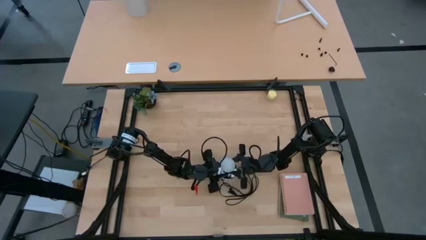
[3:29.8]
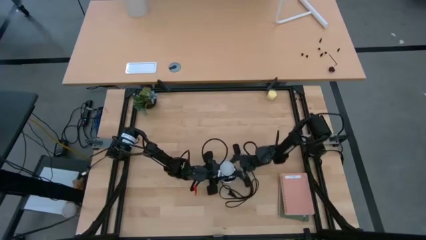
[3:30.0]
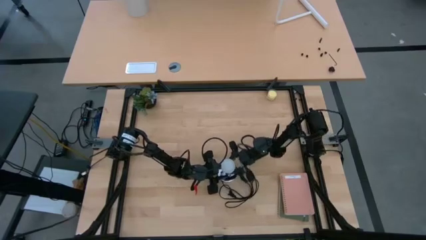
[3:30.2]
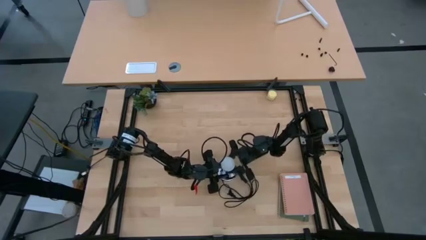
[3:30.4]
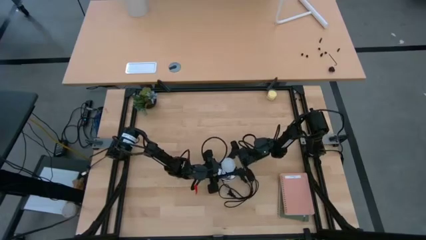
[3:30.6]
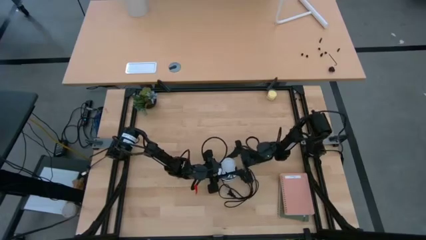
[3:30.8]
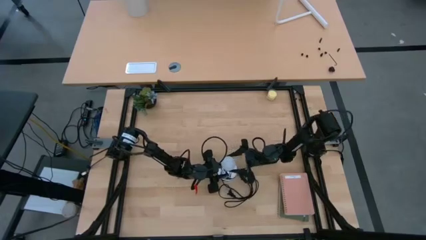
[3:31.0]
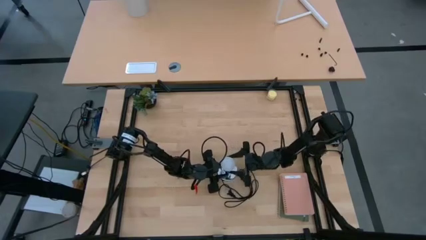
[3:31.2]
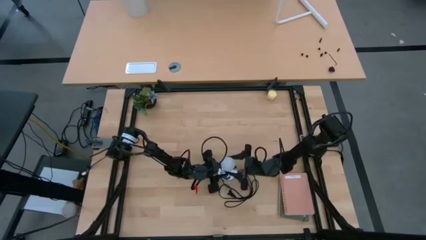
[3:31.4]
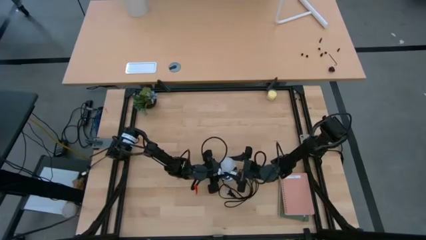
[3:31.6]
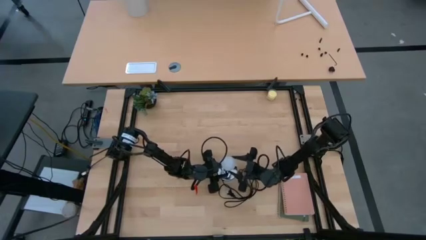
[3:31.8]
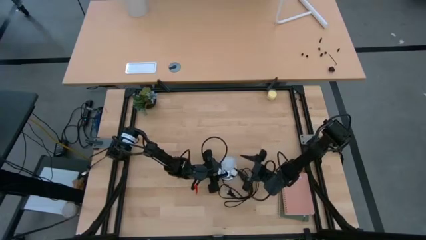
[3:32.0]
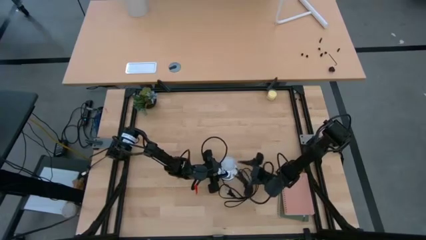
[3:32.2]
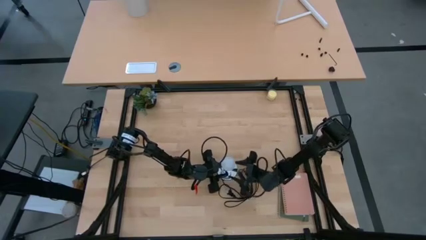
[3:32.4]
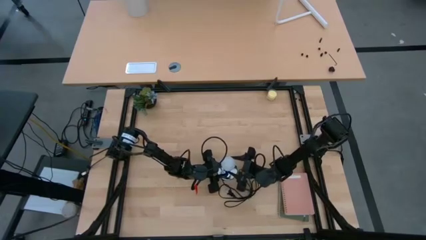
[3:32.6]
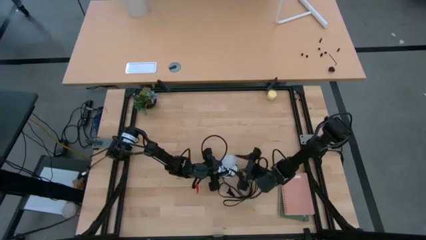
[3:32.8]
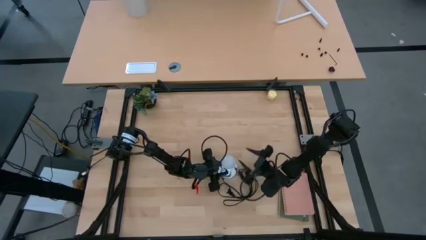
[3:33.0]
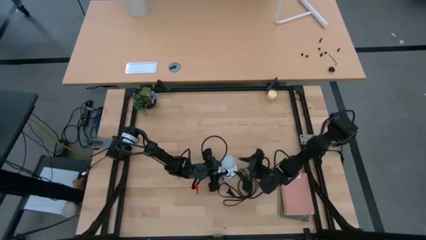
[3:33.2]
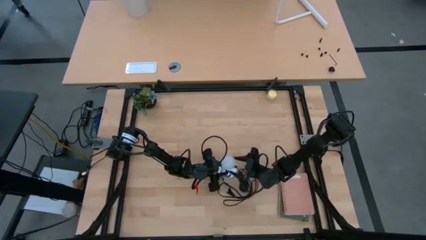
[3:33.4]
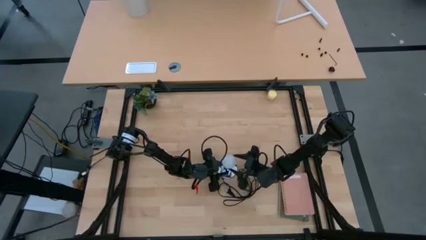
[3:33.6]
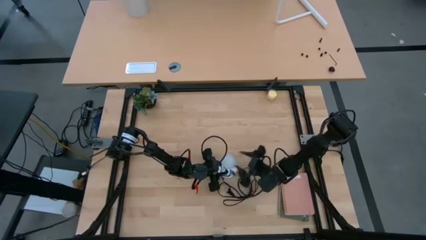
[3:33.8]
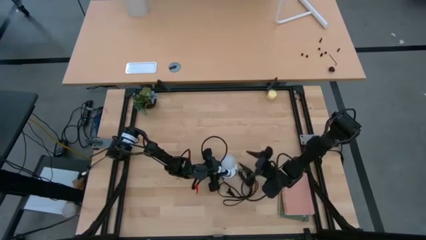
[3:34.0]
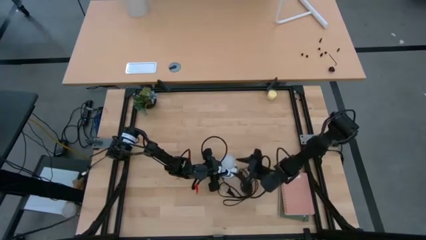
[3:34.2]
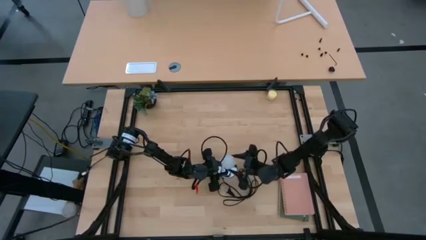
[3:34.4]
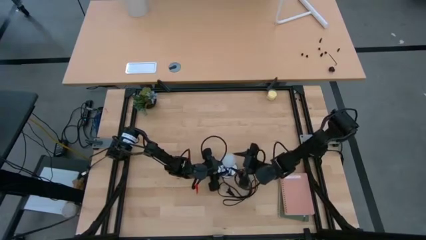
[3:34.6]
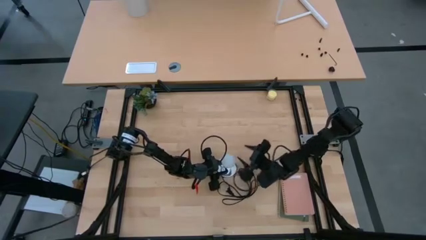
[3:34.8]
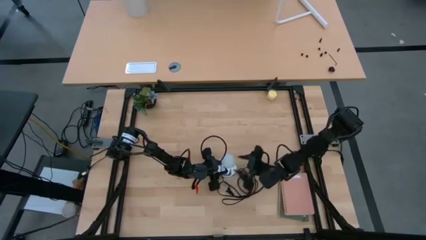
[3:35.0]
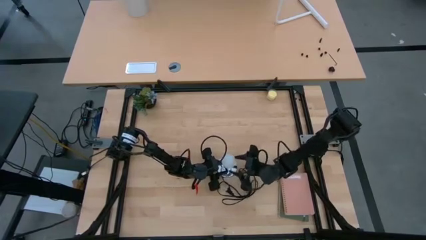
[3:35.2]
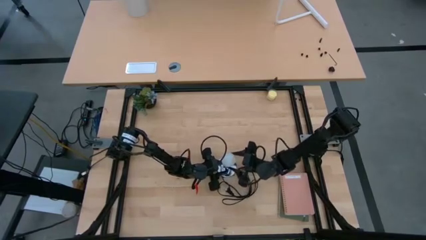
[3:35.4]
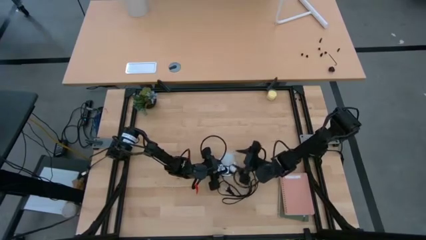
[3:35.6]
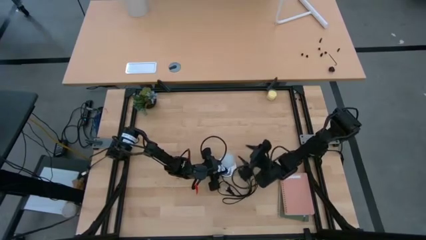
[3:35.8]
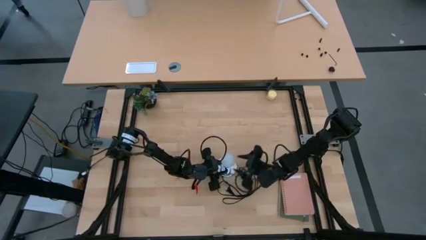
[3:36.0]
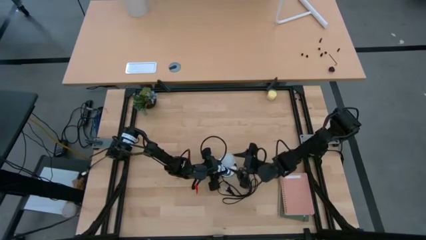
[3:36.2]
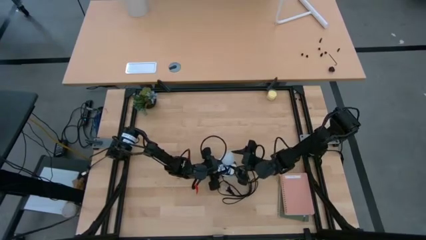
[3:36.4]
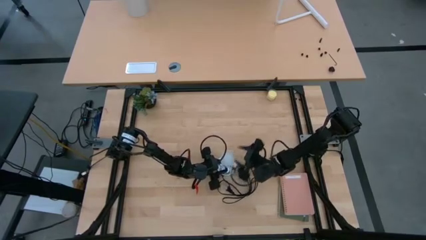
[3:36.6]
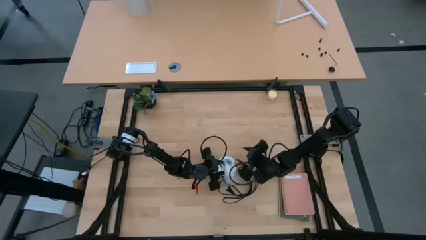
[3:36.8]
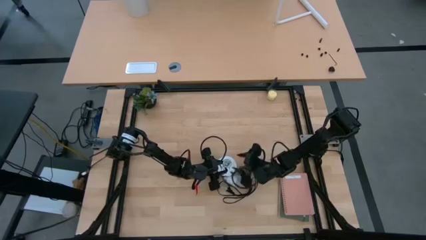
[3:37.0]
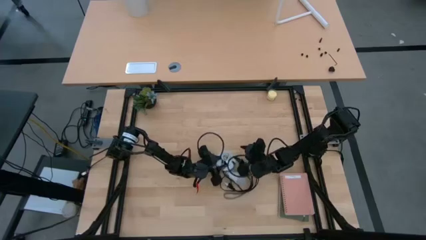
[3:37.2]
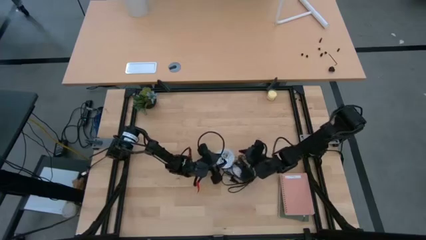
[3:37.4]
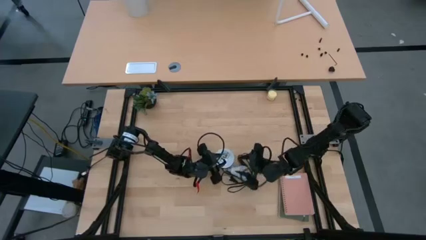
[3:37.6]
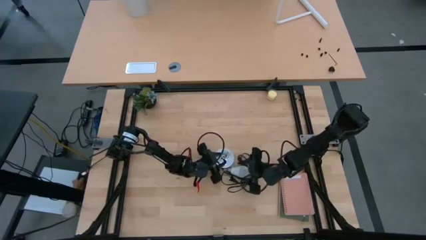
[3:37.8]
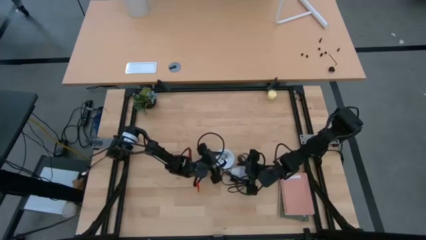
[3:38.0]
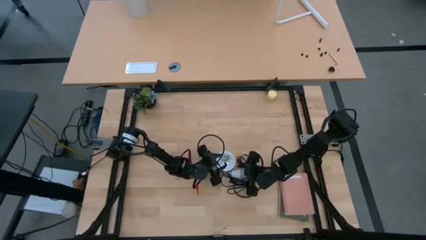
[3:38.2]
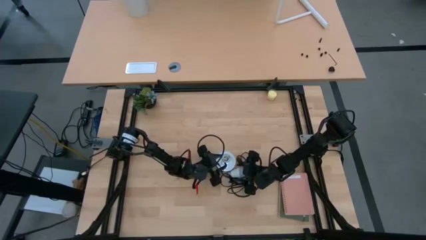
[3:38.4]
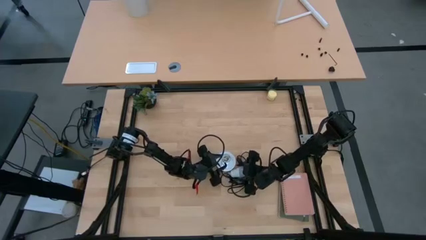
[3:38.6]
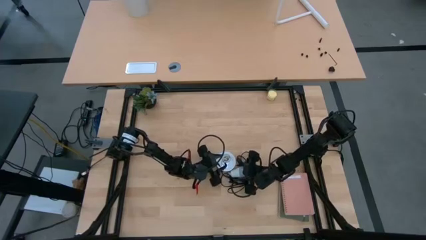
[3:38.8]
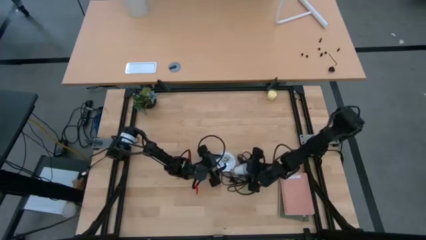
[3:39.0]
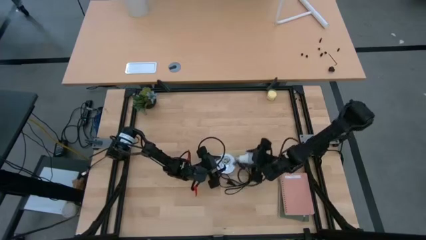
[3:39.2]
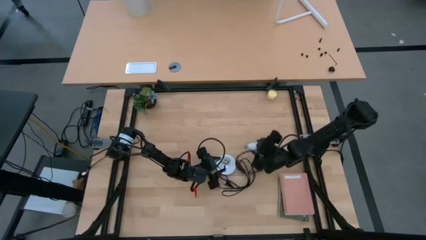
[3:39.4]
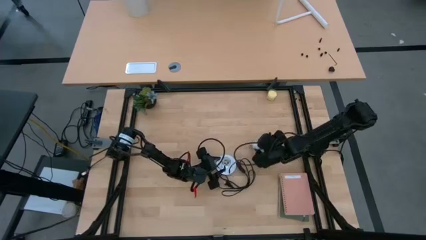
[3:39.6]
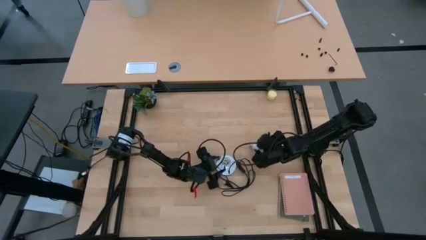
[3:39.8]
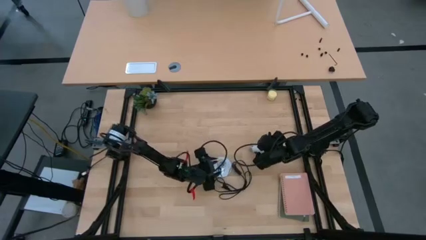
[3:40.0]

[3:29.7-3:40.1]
Task: Screw lightbulb
Remove the lightbulb from the lamp
